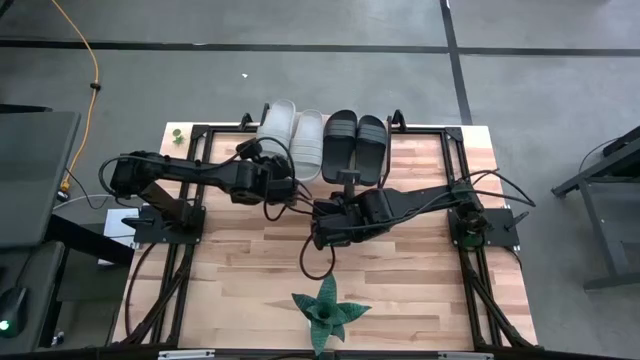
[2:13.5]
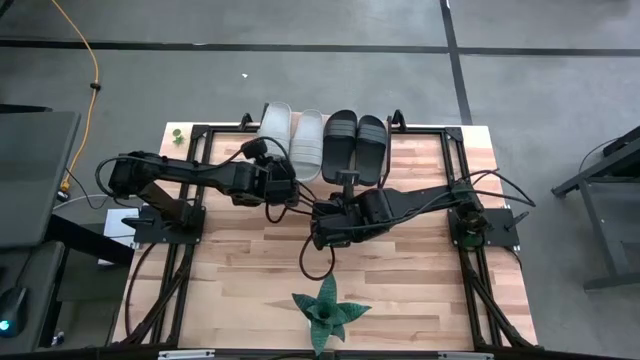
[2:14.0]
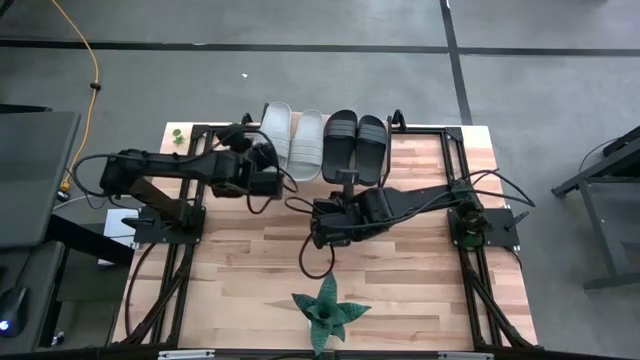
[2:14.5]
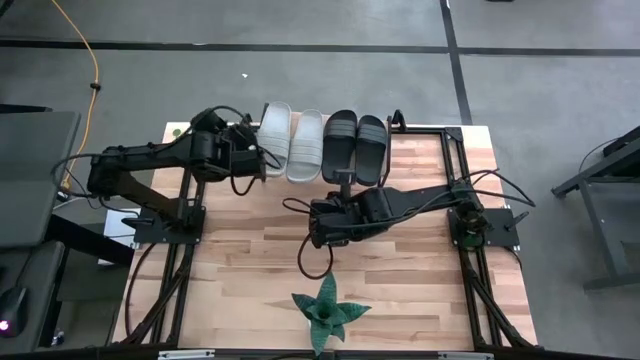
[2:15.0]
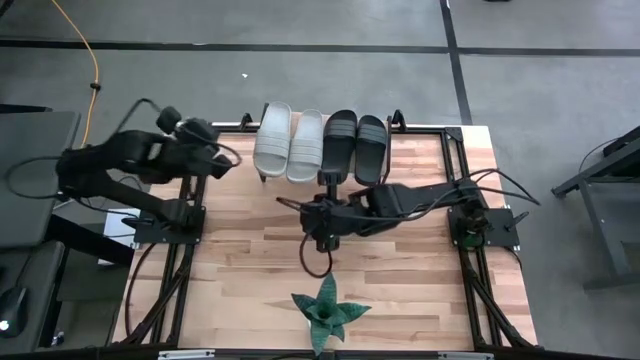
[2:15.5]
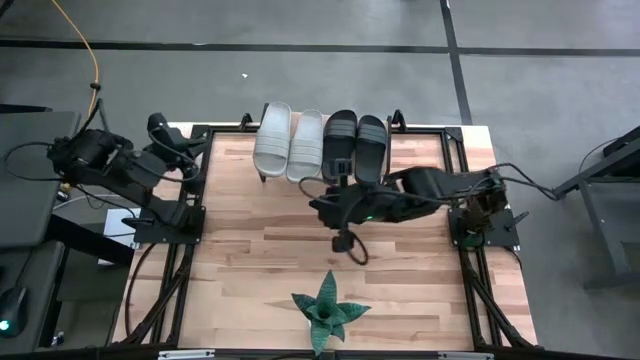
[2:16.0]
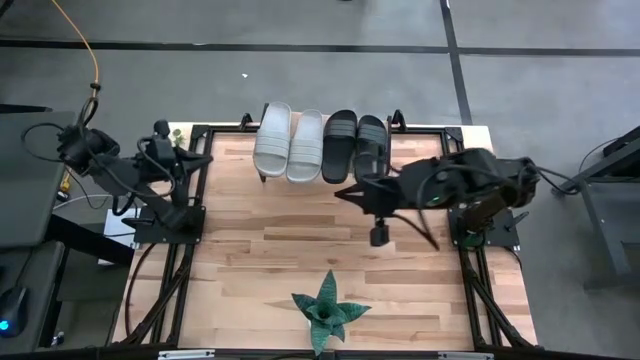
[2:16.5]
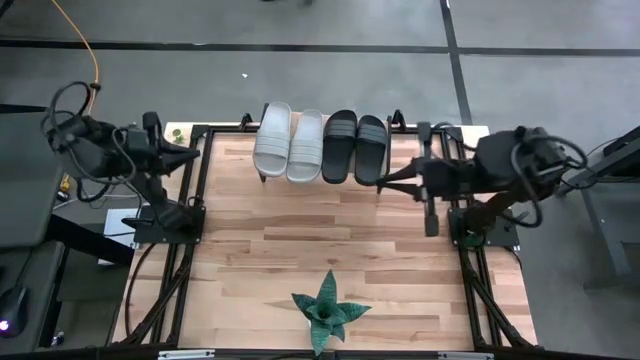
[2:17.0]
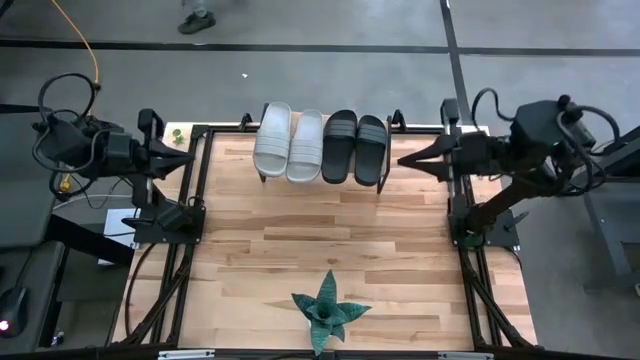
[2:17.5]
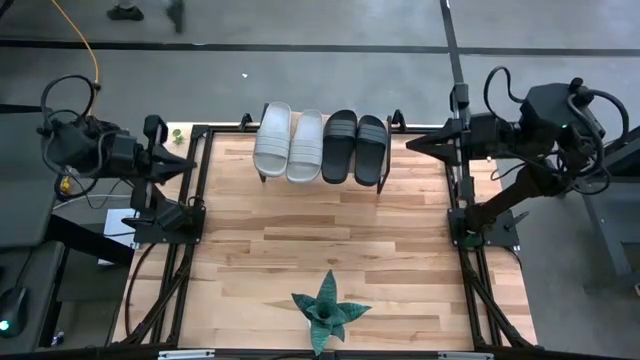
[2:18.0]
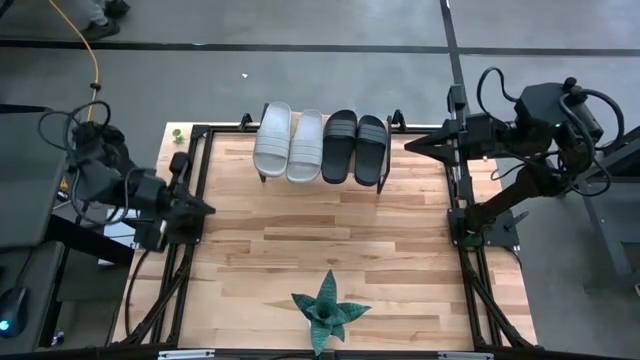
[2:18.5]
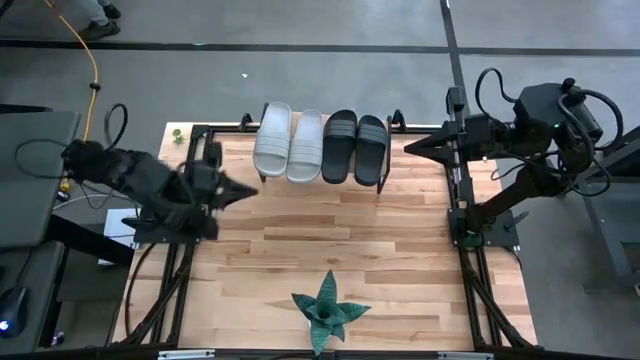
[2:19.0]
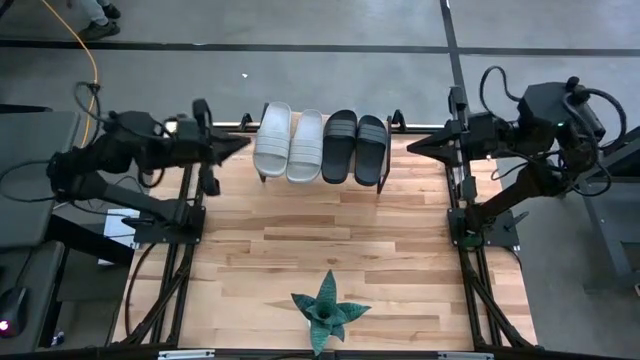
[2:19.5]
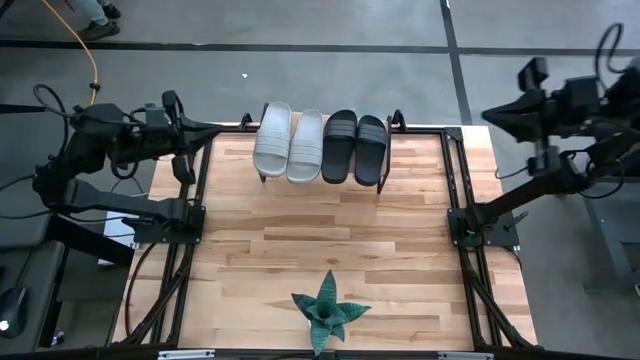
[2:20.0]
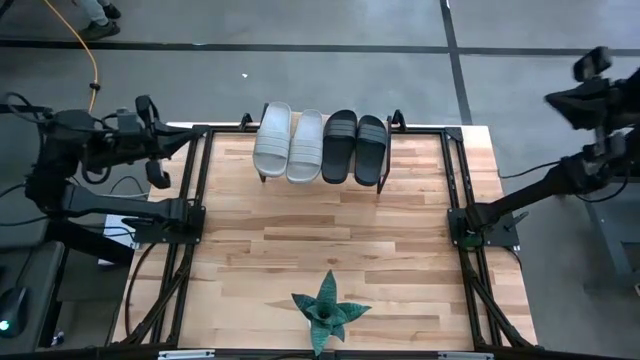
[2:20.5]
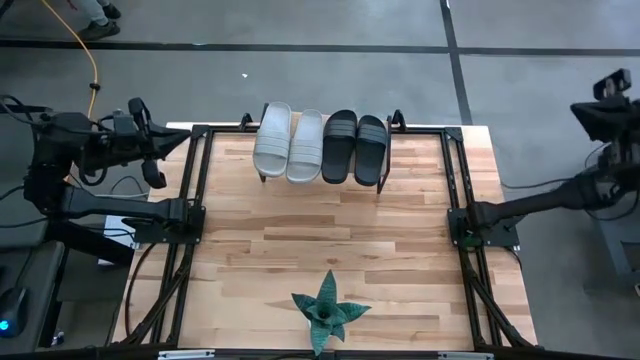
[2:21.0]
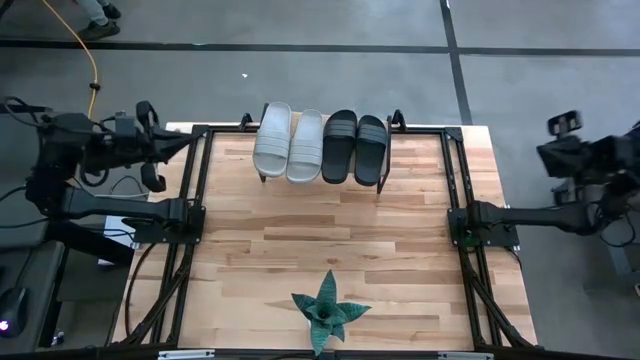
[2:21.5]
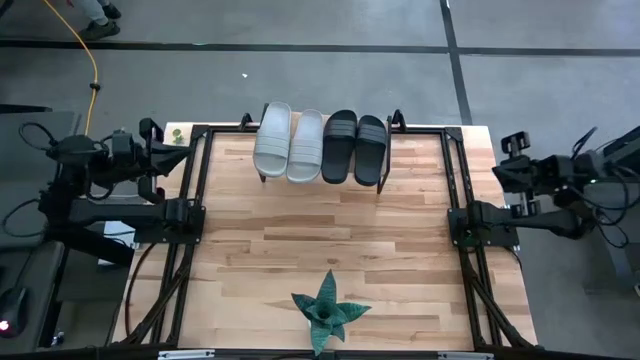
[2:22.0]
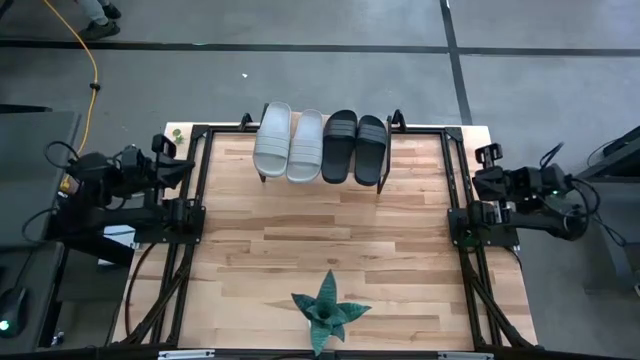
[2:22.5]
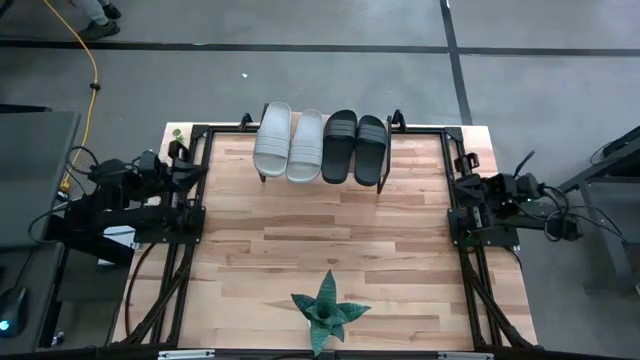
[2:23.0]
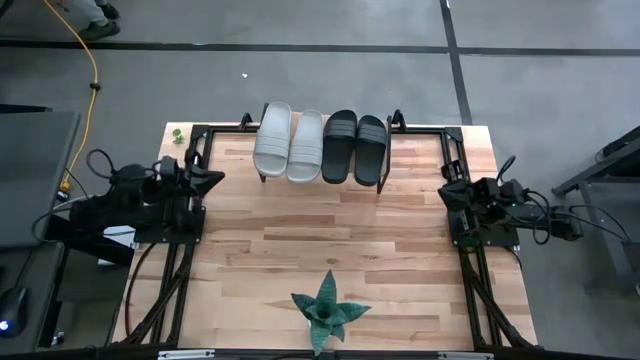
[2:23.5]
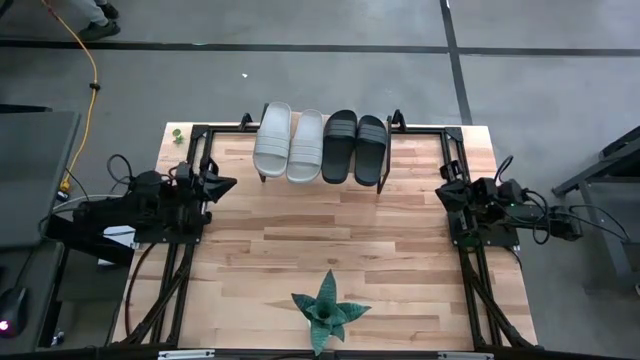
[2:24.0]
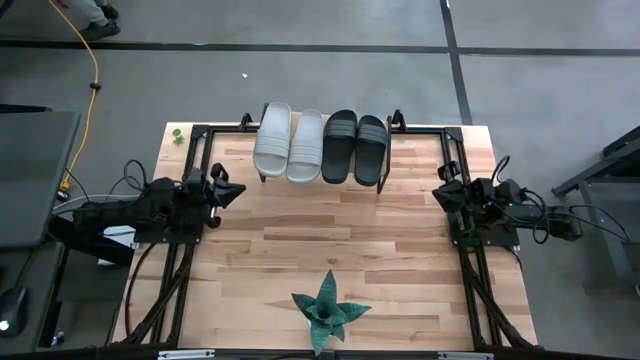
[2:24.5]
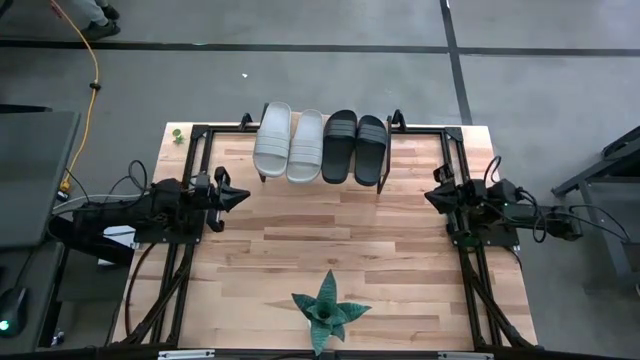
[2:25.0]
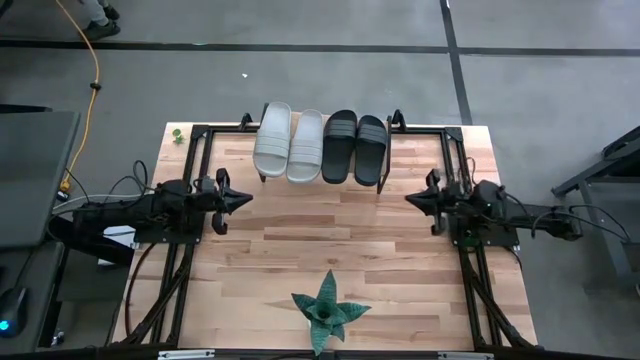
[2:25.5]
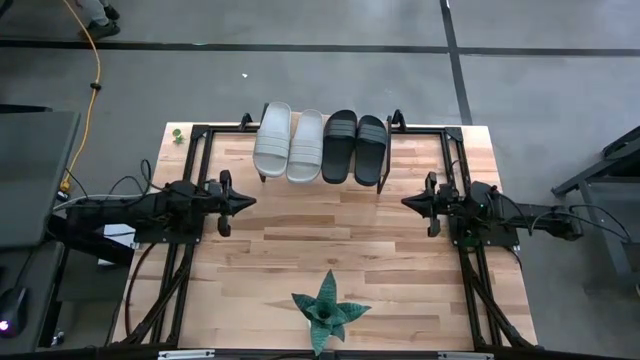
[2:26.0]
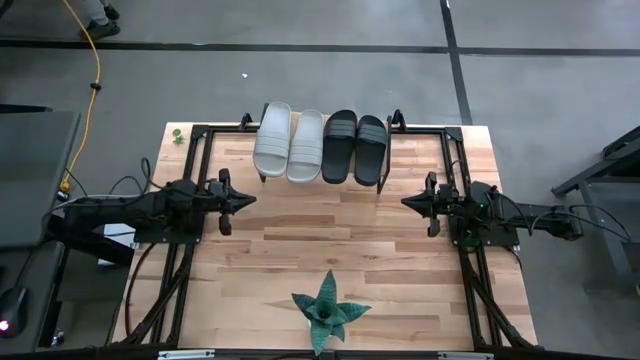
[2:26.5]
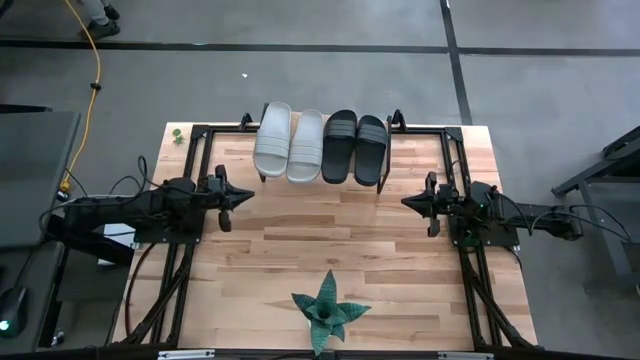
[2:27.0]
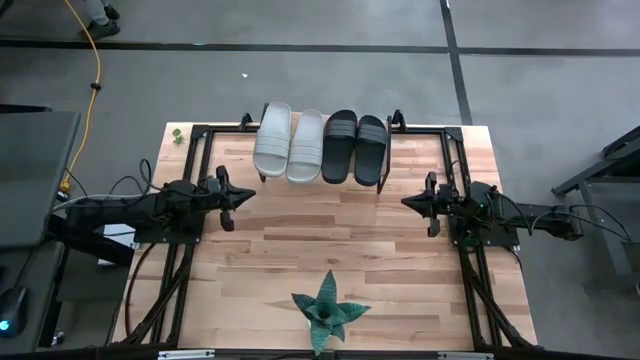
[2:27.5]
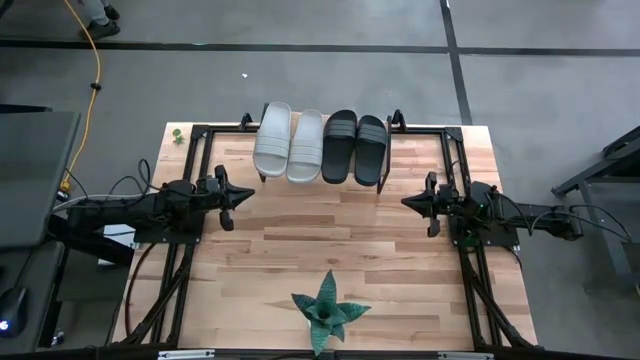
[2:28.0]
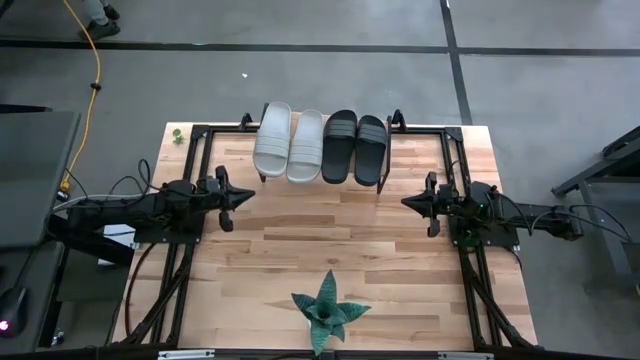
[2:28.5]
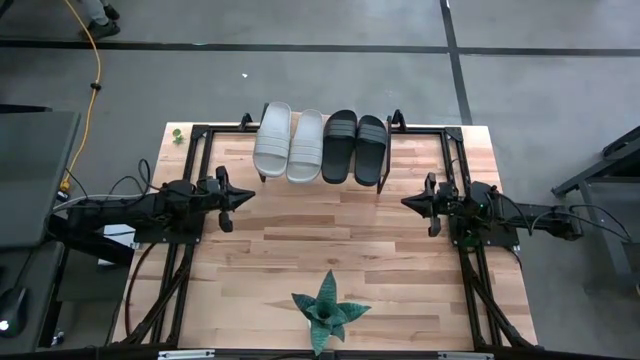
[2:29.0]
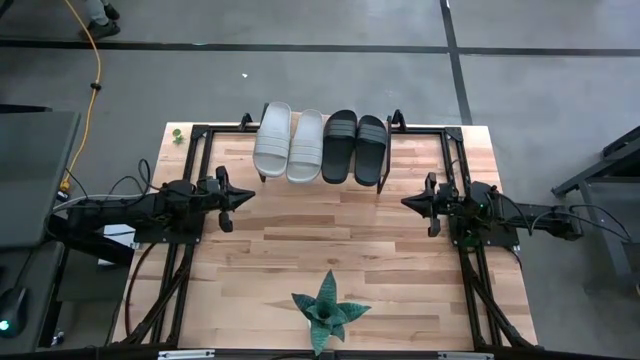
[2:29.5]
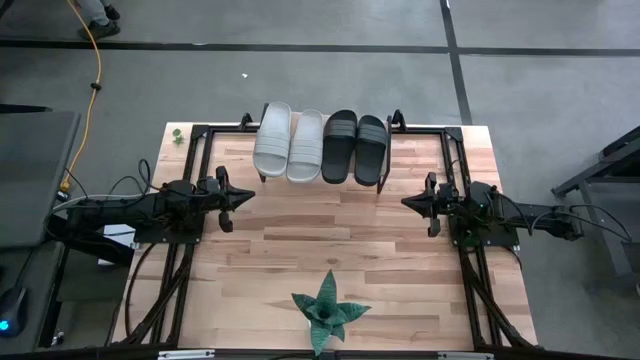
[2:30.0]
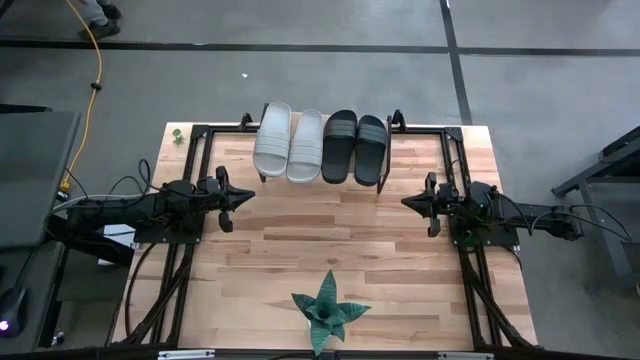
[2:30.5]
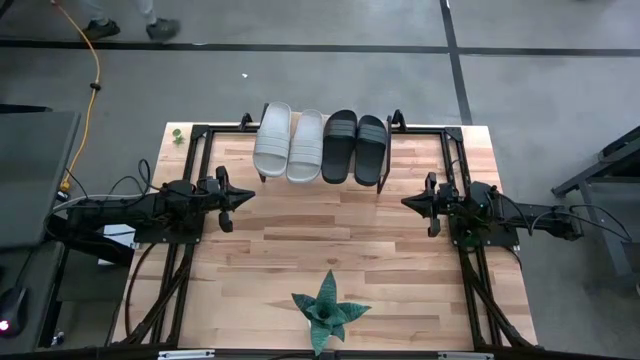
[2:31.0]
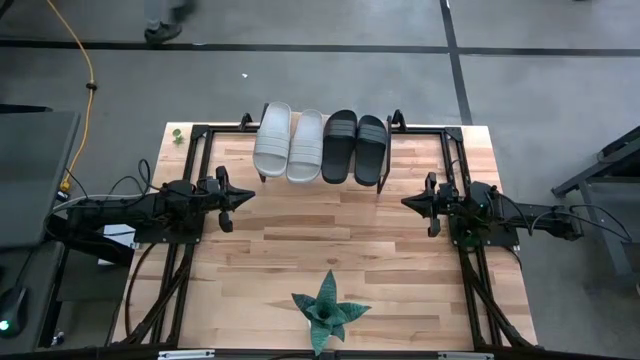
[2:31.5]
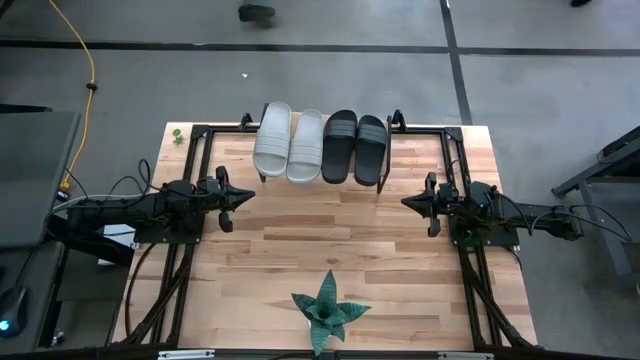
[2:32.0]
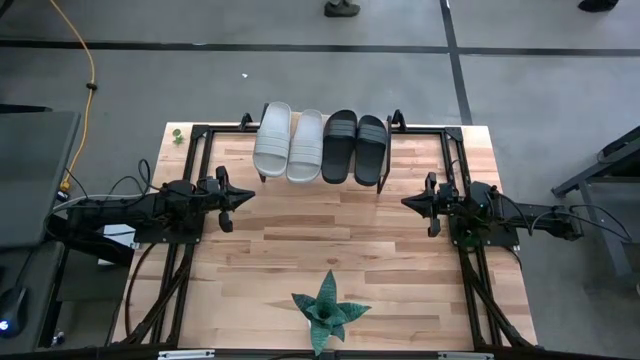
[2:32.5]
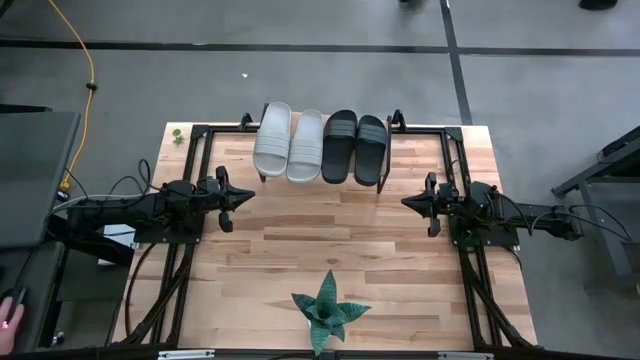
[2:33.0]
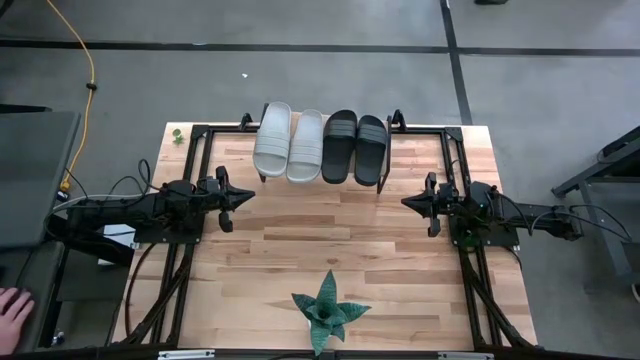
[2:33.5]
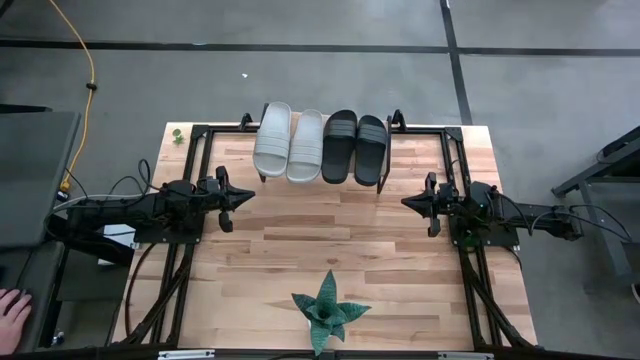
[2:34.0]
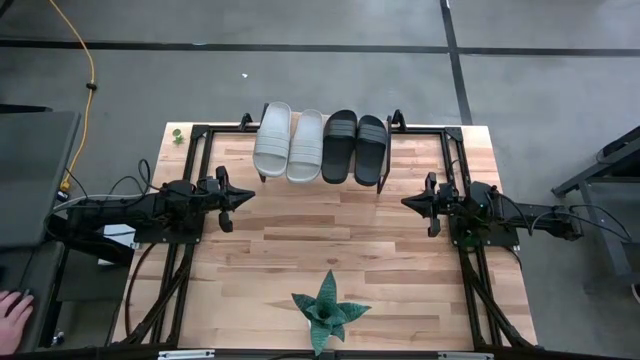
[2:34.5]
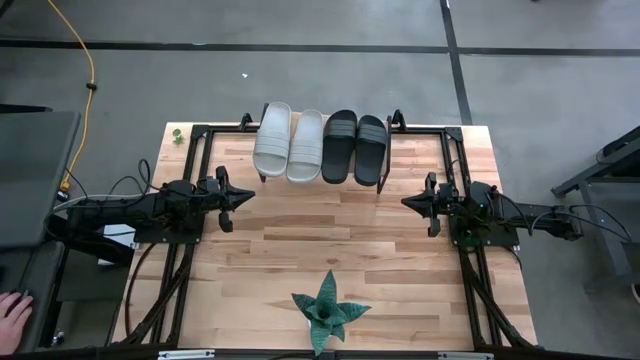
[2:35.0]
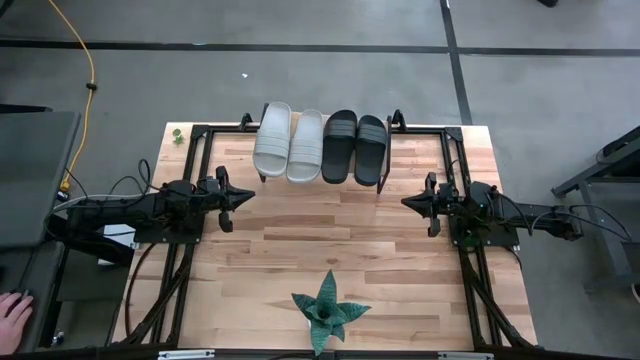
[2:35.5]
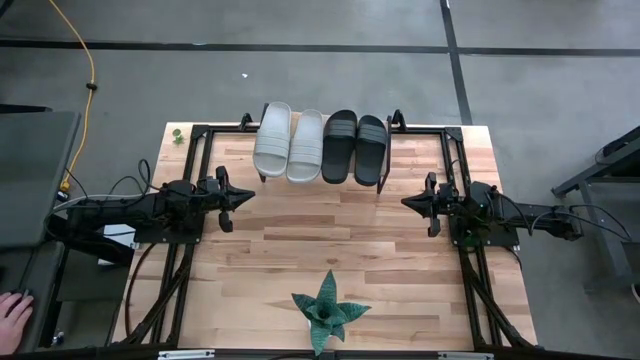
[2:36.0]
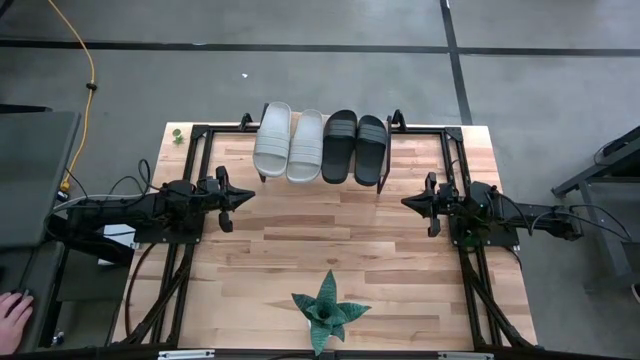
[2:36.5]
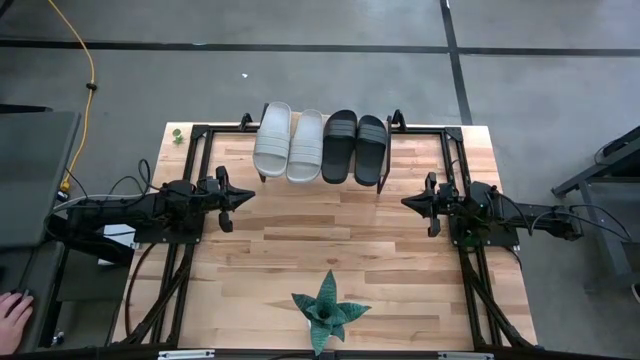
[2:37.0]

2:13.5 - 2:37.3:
Task: Pick and place slides into the shelf
Return to Home Position
